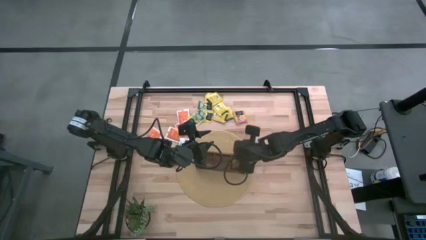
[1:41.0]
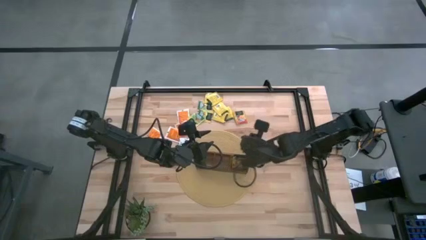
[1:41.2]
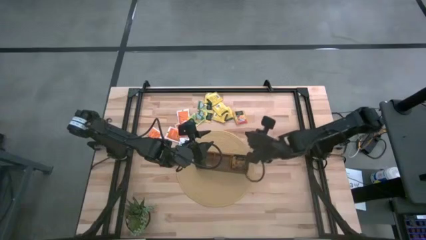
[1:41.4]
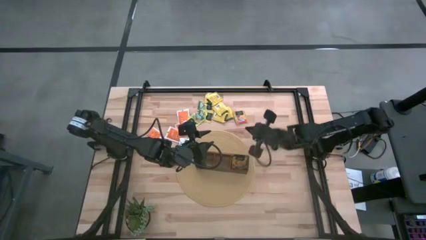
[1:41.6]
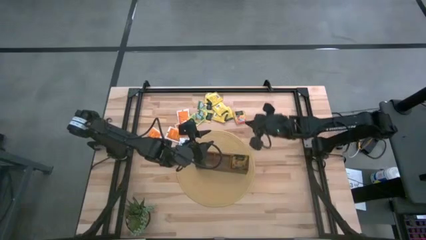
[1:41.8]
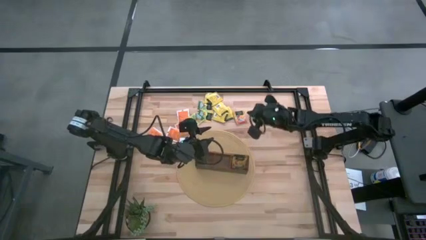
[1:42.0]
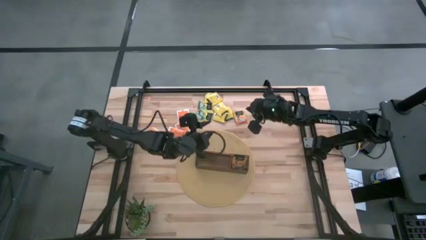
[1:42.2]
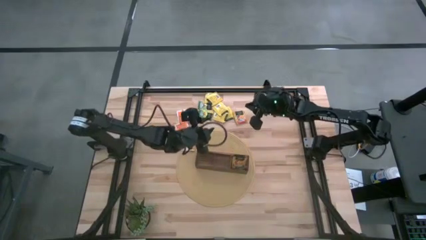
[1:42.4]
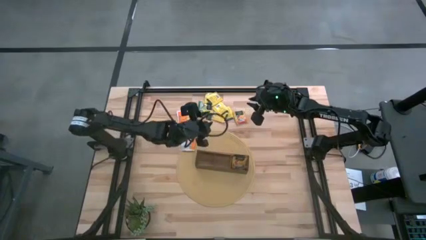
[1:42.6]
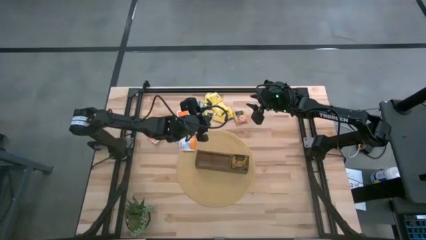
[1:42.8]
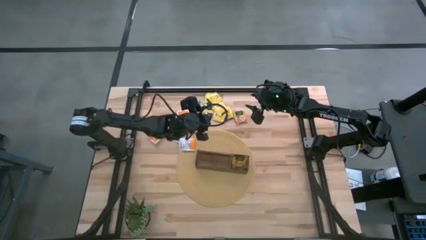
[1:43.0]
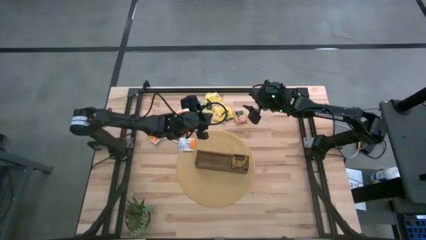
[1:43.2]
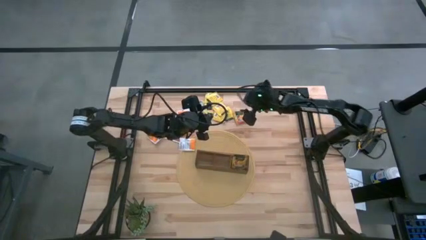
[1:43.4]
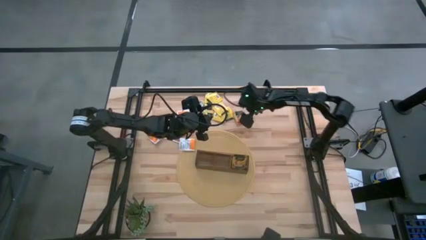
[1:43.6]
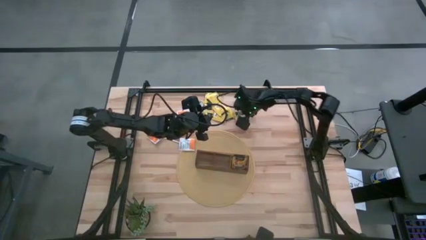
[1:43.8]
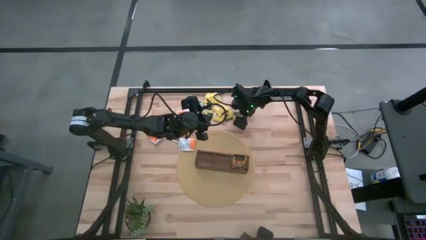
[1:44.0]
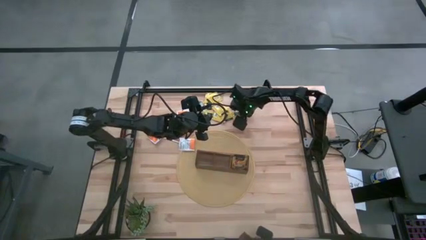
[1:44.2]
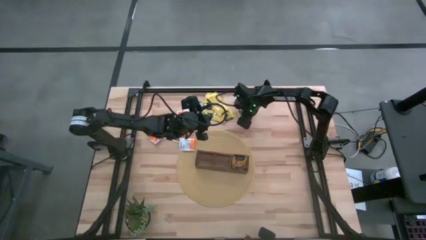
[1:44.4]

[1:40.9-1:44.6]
Task: Pick & Place Tea
Put the orange and green tea bag into the wooden organizer

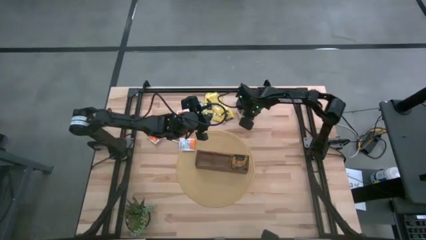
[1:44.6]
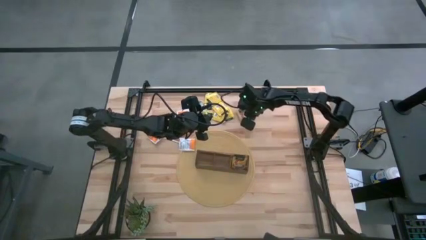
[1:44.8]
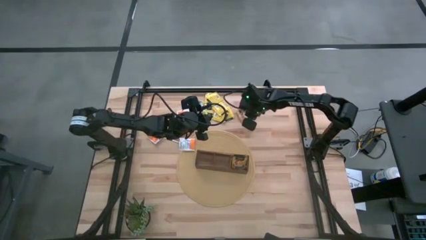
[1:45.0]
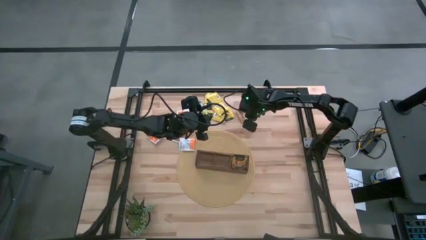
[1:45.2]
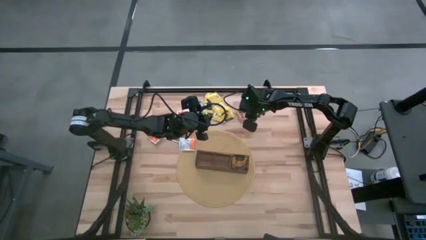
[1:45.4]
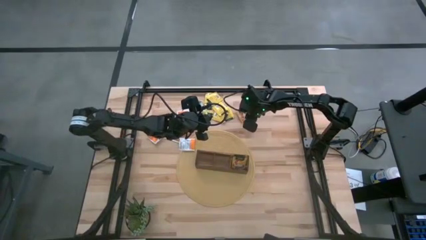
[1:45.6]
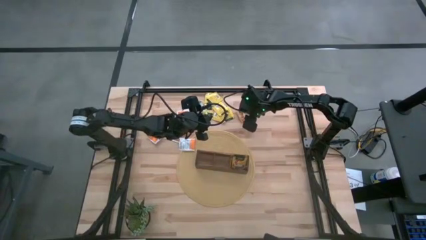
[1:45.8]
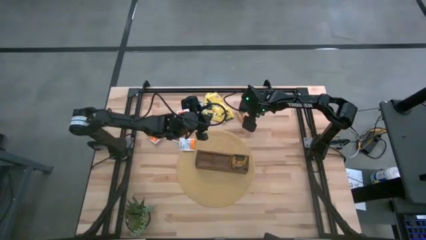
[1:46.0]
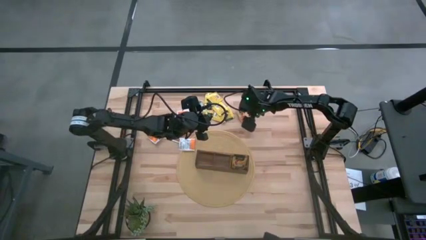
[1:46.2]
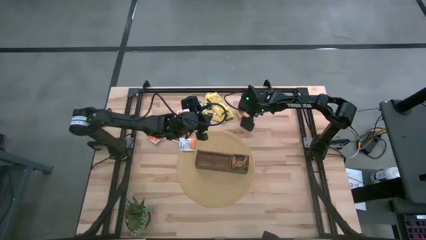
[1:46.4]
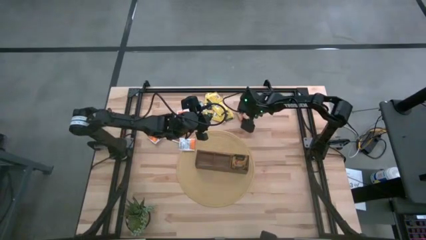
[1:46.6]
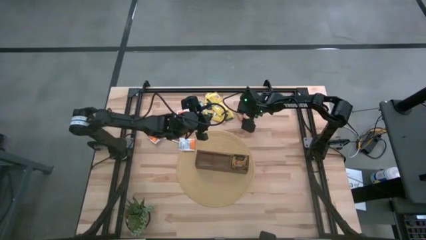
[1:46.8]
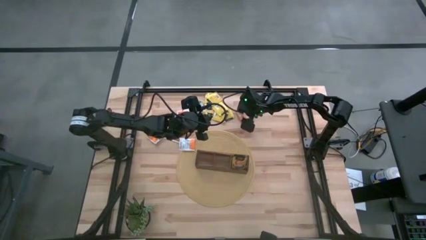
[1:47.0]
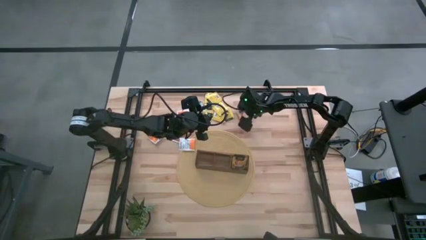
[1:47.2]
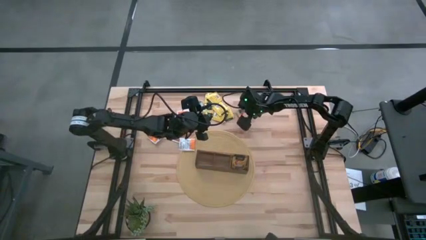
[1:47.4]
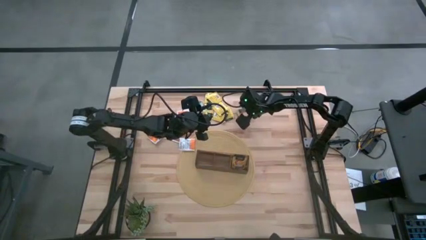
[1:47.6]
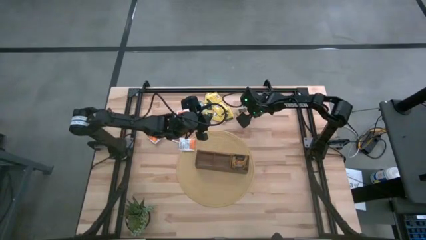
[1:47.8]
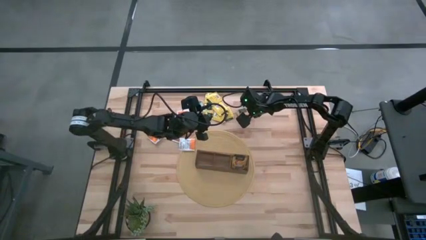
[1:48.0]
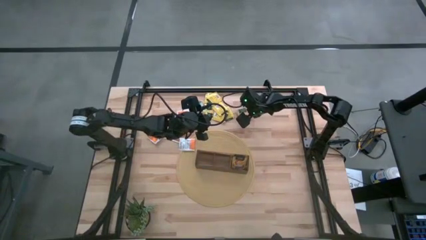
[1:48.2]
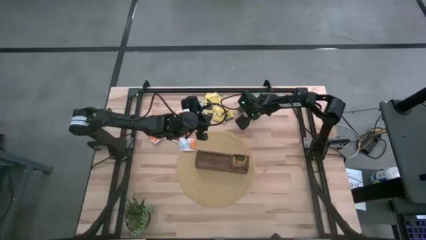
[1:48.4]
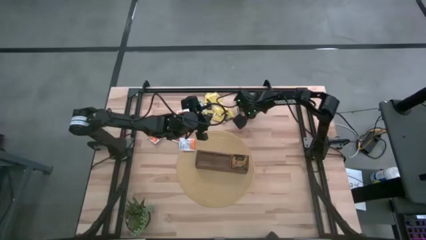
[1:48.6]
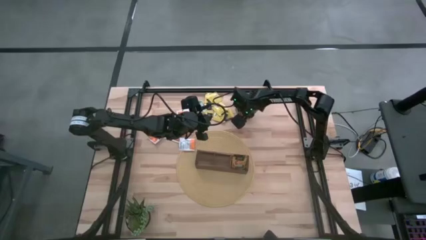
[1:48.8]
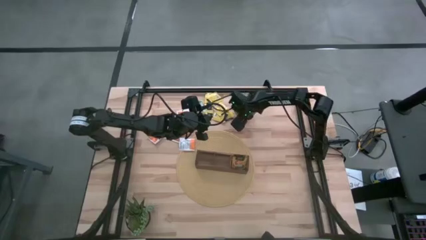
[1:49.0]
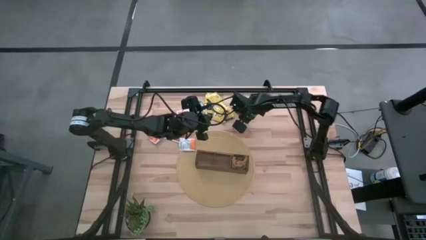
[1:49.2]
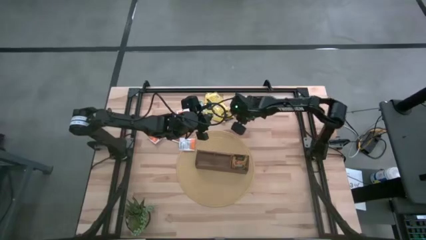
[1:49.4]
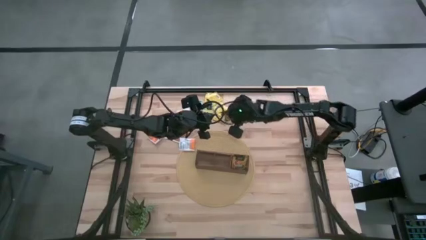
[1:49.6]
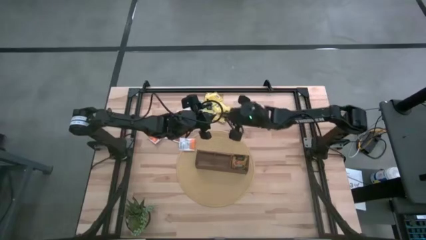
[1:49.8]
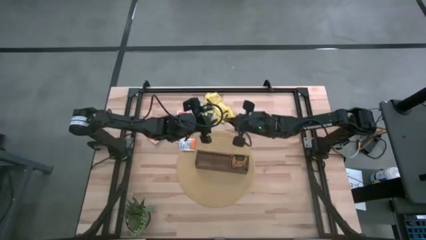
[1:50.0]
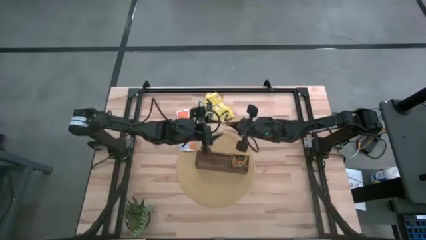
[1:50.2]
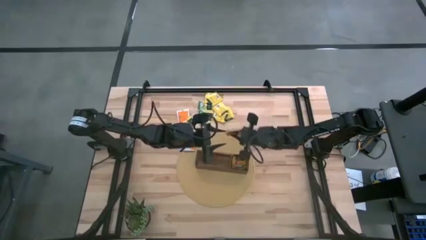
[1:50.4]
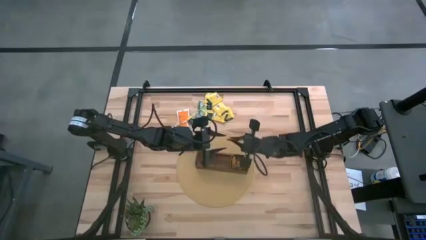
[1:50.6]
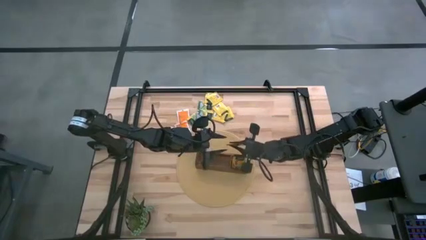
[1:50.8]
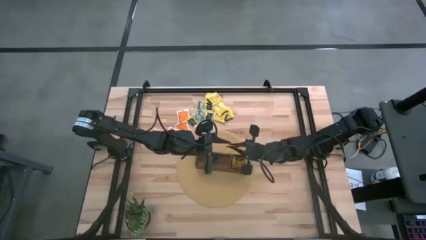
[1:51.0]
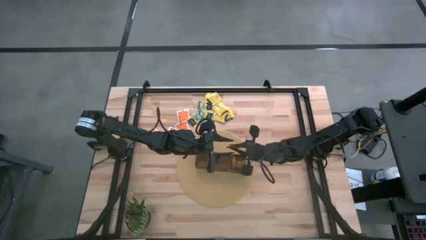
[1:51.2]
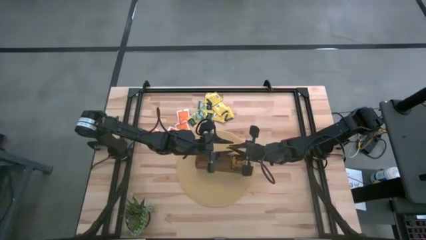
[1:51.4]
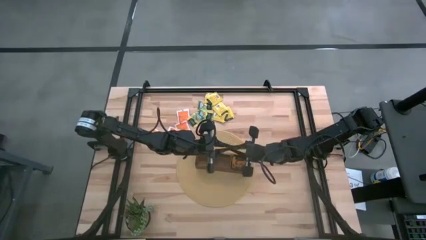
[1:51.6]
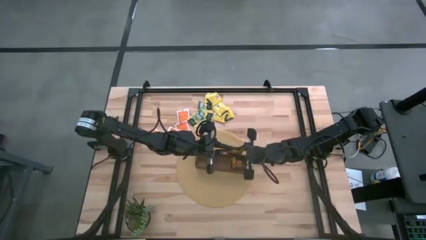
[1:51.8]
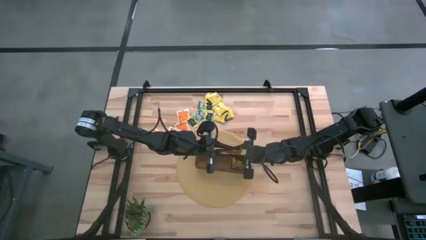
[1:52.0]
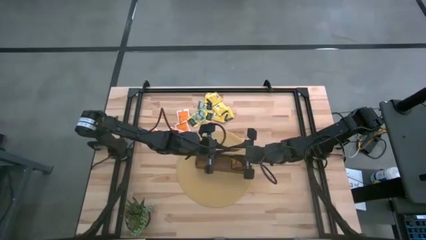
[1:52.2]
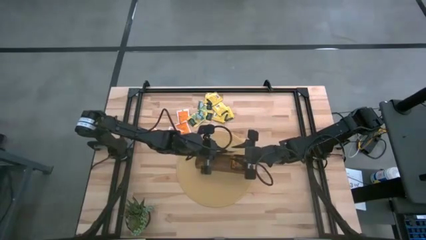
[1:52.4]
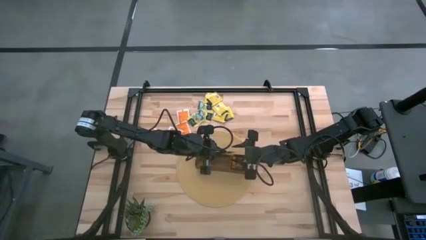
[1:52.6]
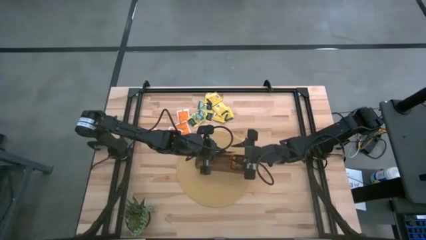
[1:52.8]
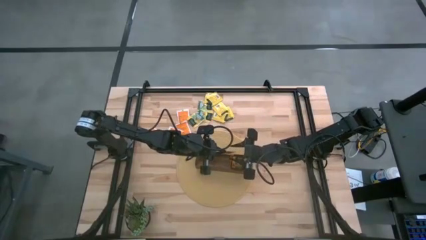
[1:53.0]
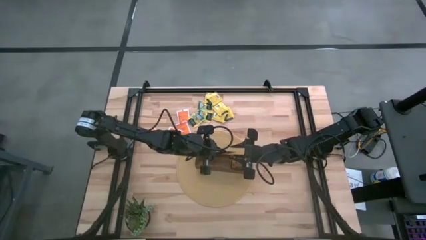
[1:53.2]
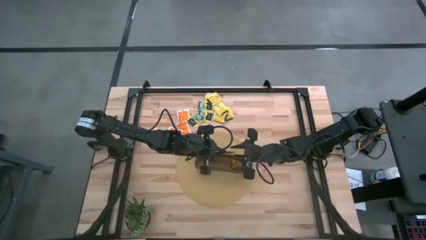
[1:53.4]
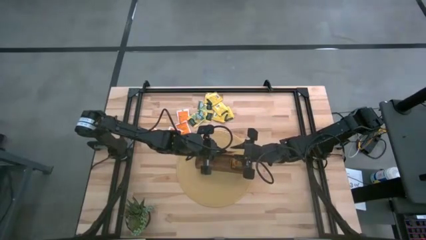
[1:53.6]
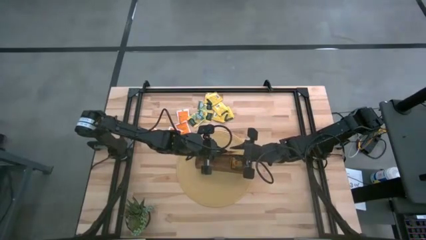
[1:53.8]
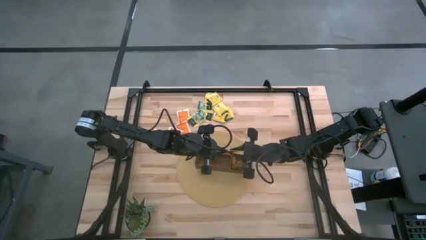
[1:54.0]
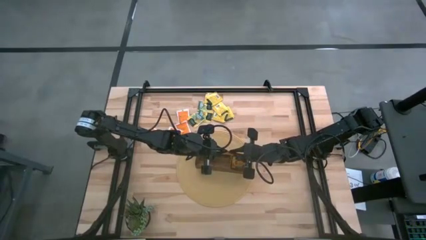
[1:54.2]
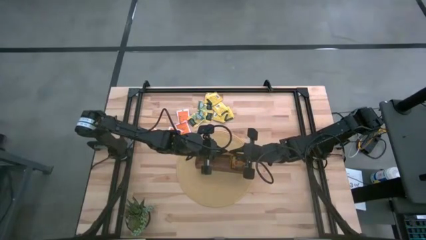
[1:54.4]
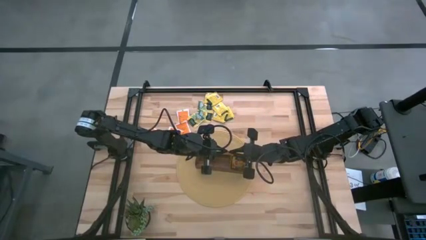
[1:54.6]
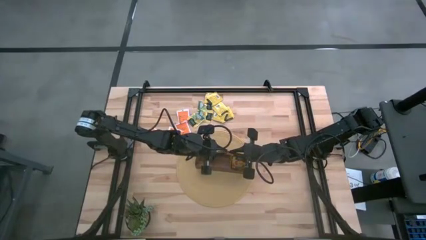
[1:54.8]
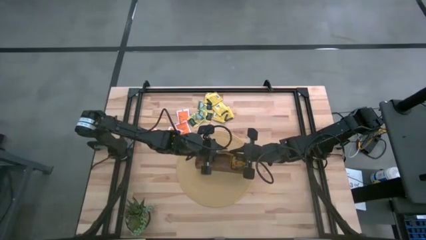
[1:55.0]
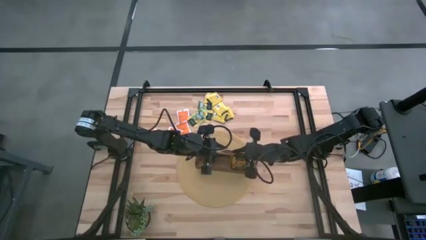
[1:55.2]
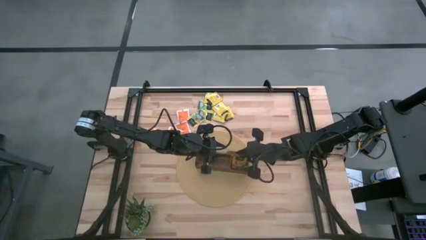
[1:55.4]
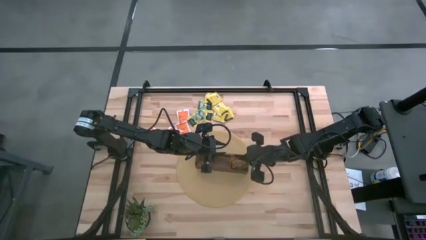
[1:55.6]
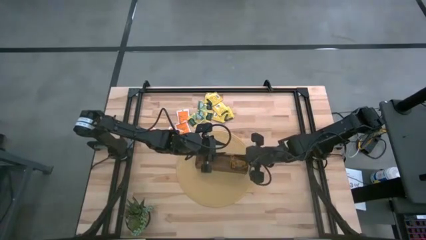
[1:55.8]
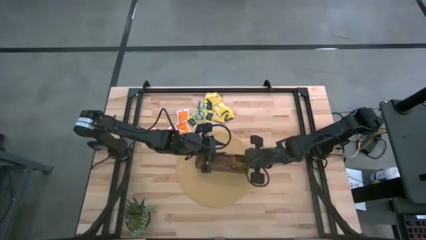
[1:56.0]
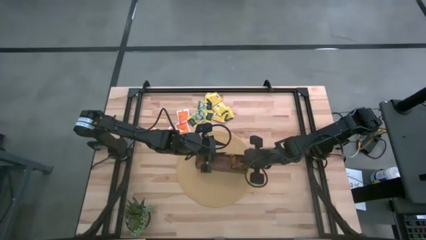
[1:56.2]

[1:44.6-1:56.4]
Put the orange and green tea bag into the wooden organizer

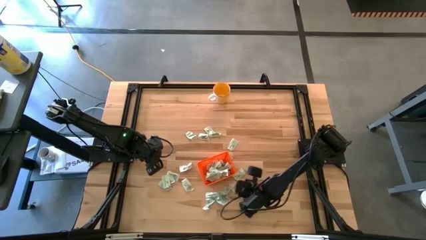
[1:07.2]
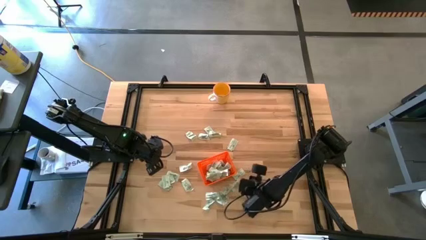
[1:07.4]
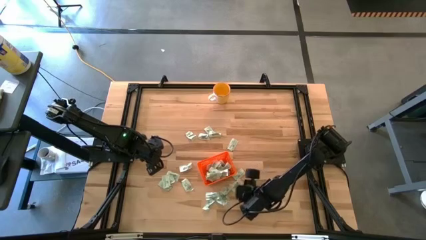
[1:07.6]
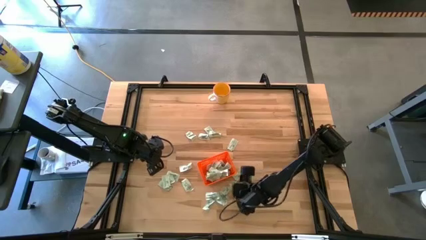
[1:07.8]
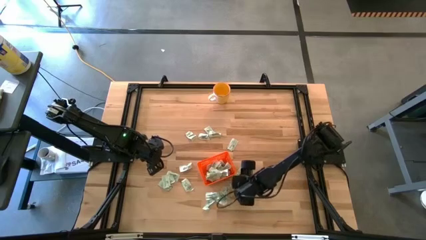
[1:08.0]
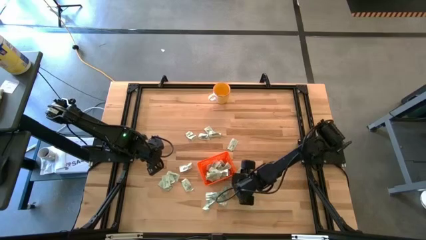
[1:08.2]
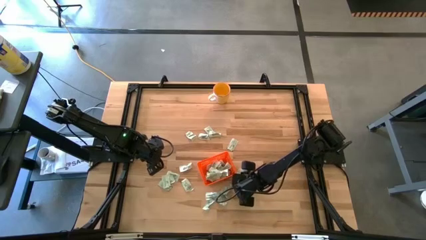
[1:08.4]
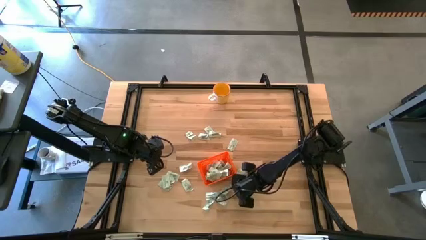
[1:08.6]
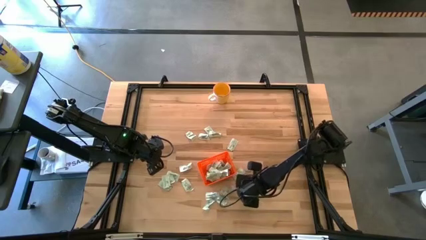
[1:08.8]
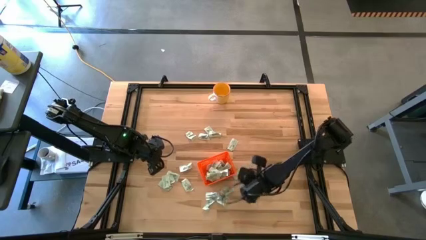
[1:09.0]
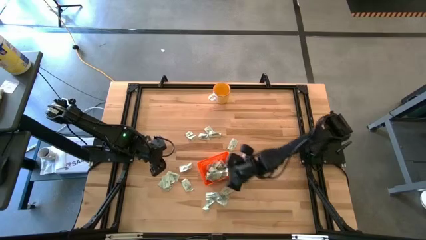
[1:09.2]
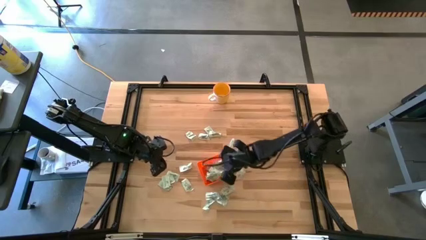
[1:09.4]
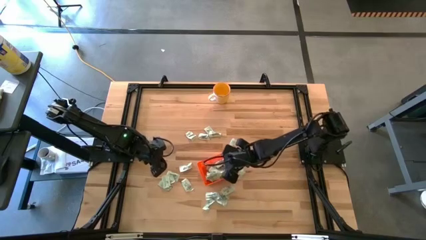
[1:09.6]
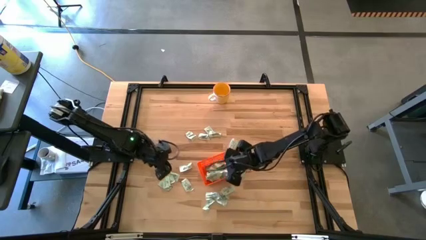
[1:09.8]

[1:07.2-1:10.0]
Task: Pick and place Stevia / Truvia into bins
Put the stevia packet into the bin
